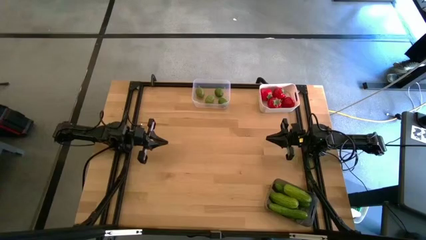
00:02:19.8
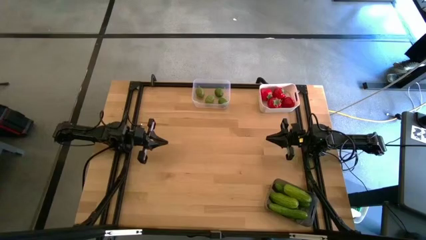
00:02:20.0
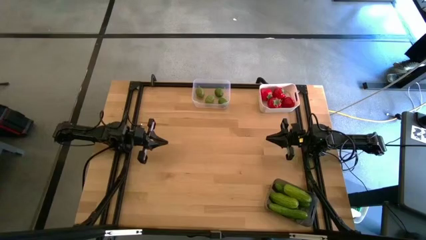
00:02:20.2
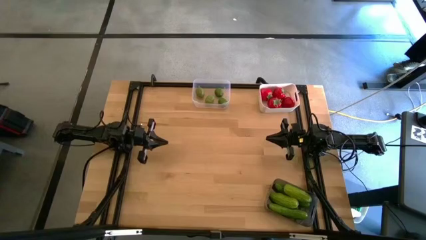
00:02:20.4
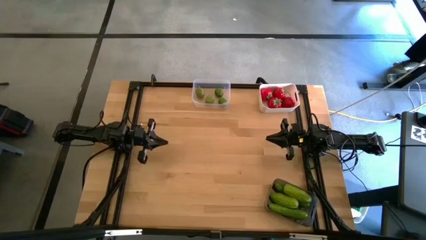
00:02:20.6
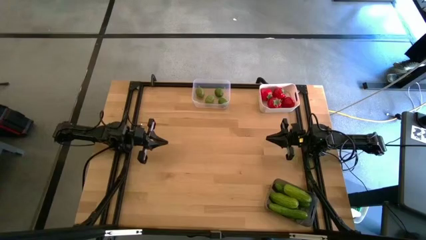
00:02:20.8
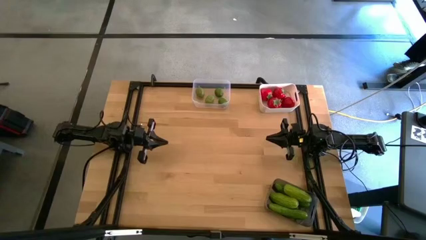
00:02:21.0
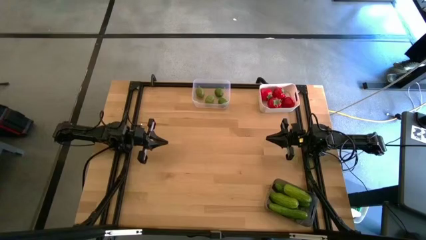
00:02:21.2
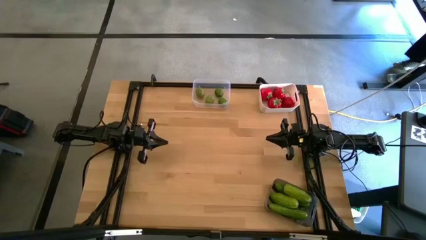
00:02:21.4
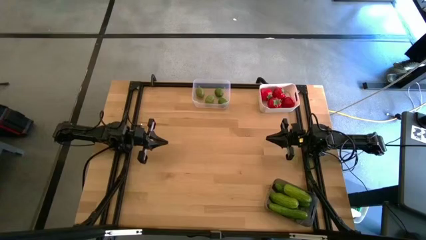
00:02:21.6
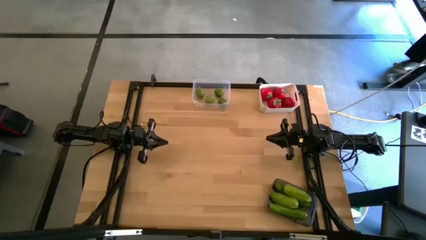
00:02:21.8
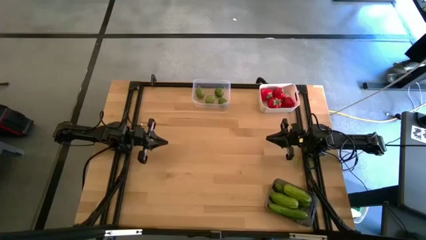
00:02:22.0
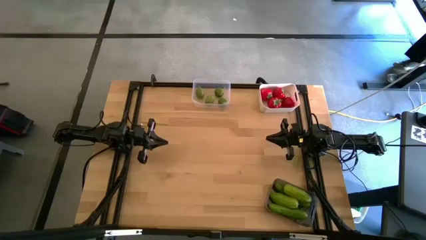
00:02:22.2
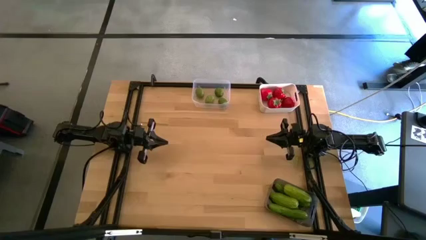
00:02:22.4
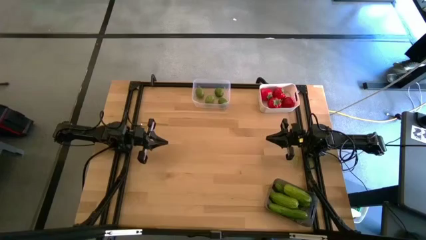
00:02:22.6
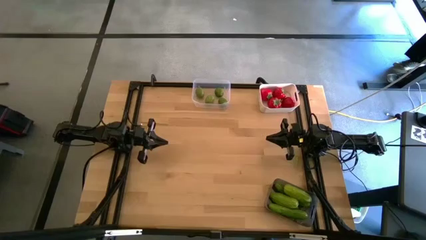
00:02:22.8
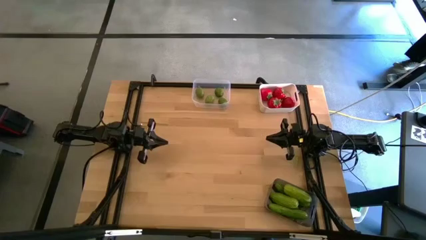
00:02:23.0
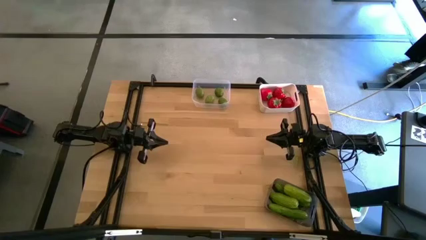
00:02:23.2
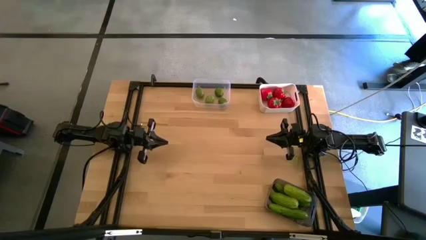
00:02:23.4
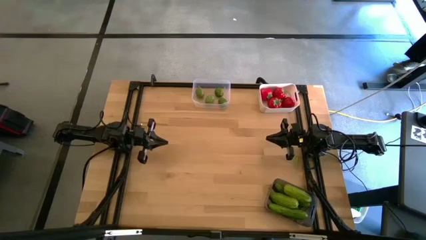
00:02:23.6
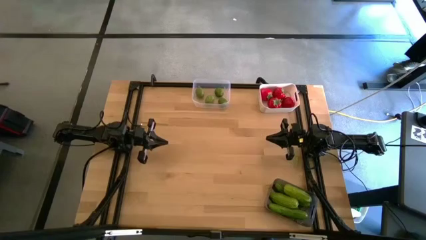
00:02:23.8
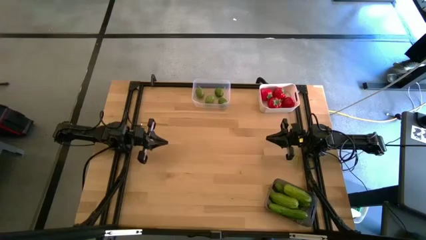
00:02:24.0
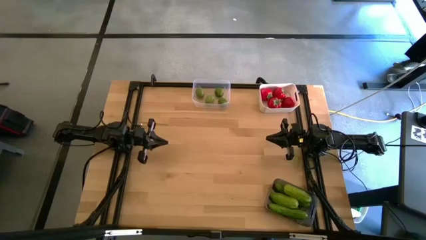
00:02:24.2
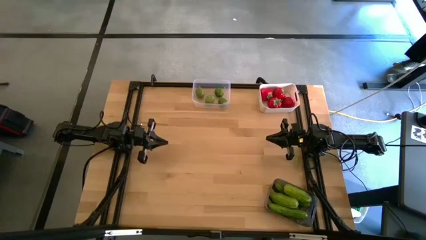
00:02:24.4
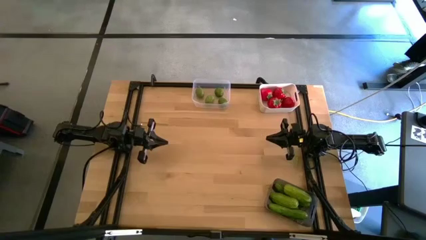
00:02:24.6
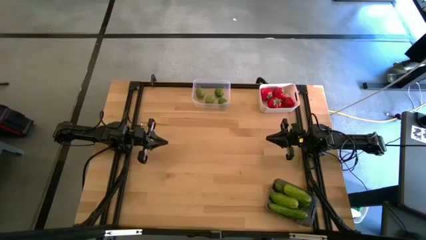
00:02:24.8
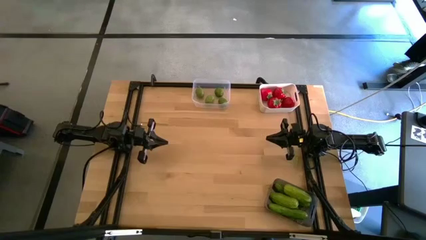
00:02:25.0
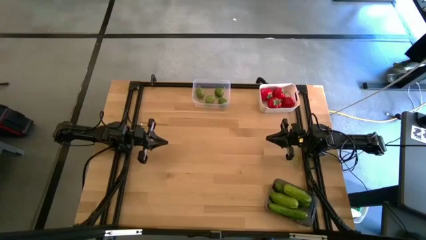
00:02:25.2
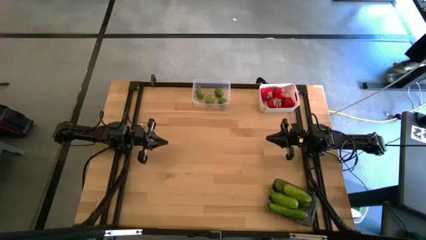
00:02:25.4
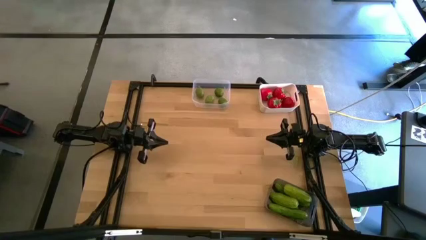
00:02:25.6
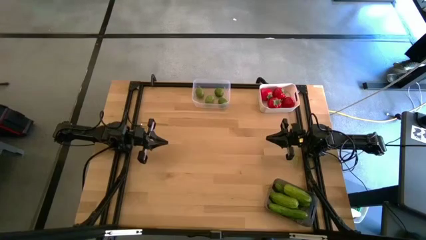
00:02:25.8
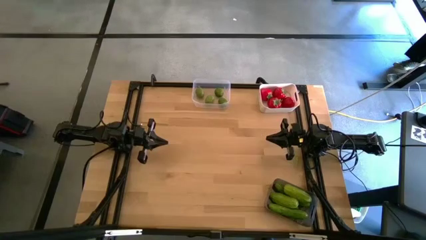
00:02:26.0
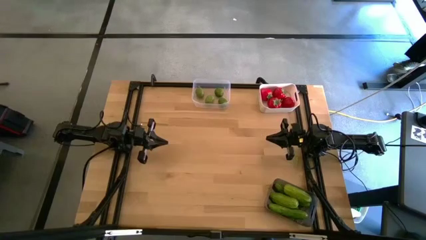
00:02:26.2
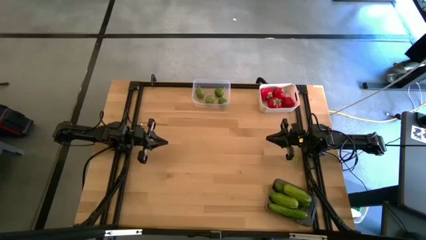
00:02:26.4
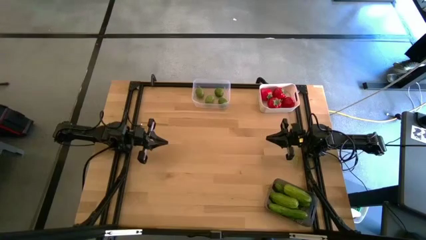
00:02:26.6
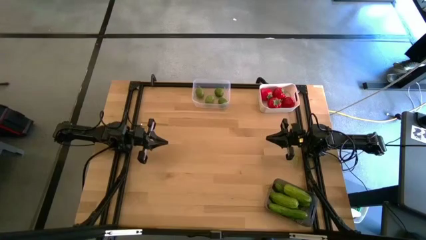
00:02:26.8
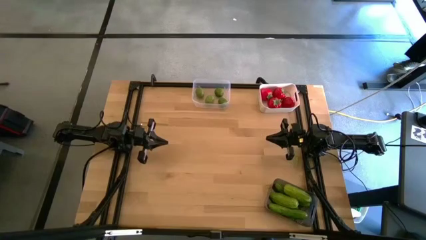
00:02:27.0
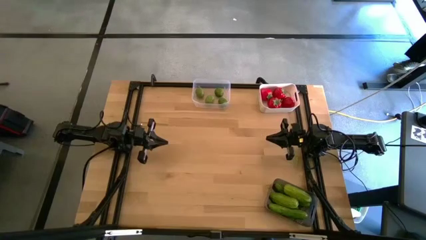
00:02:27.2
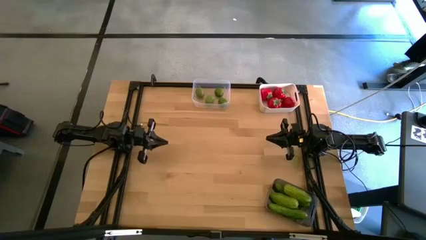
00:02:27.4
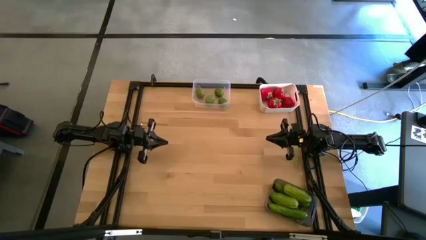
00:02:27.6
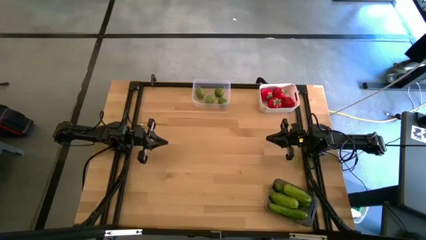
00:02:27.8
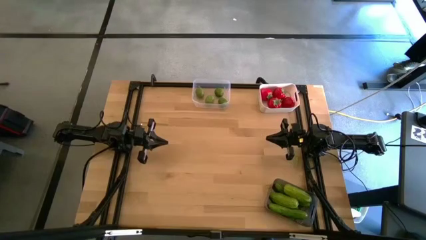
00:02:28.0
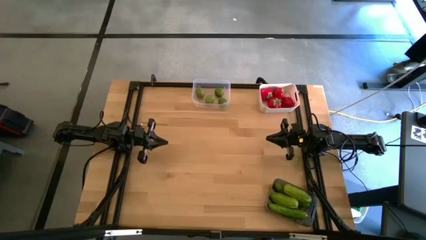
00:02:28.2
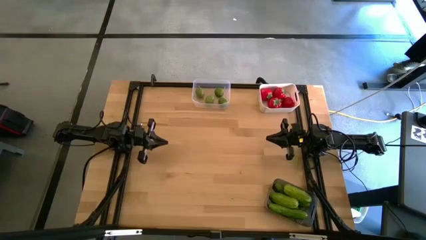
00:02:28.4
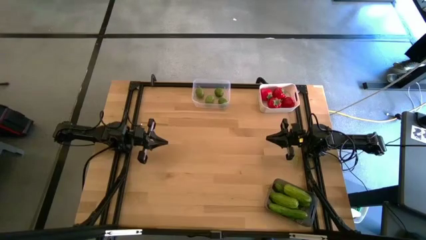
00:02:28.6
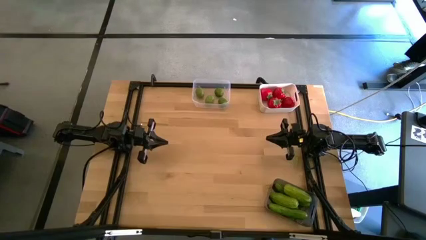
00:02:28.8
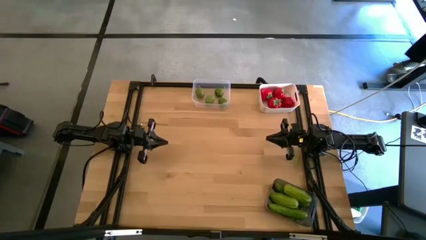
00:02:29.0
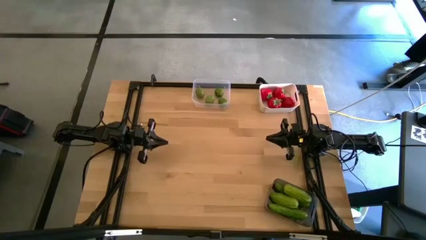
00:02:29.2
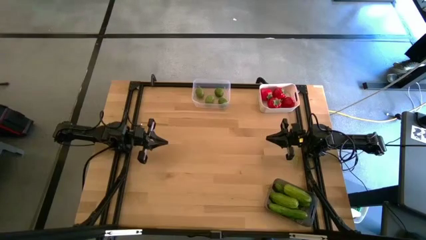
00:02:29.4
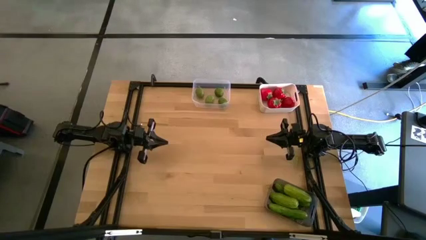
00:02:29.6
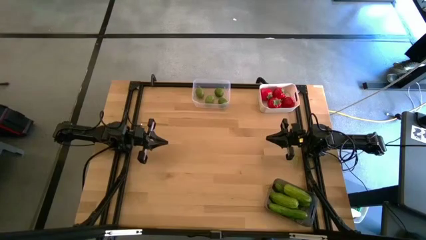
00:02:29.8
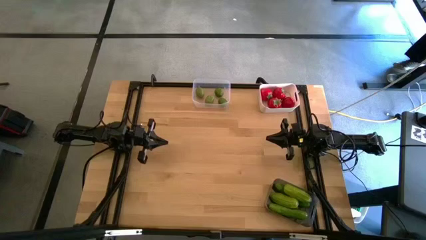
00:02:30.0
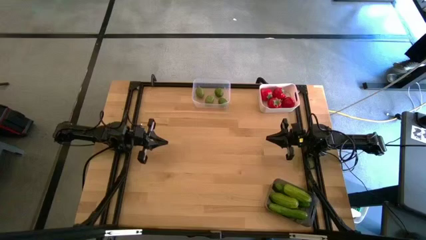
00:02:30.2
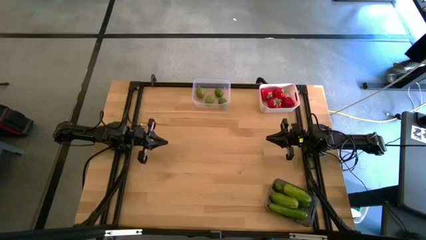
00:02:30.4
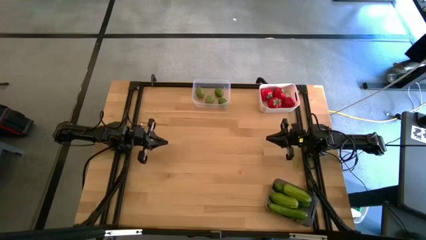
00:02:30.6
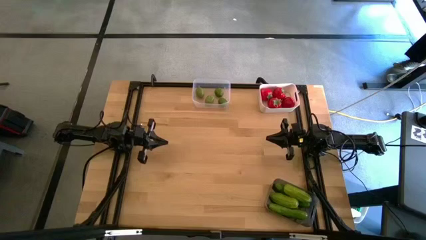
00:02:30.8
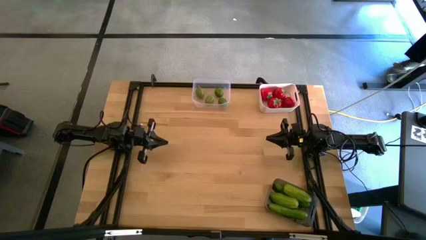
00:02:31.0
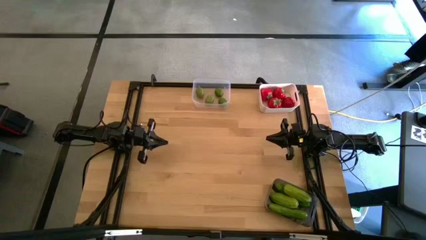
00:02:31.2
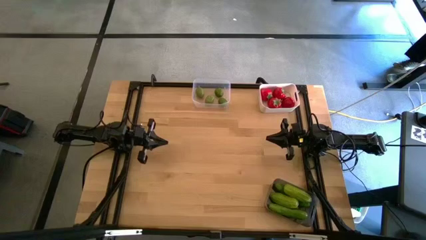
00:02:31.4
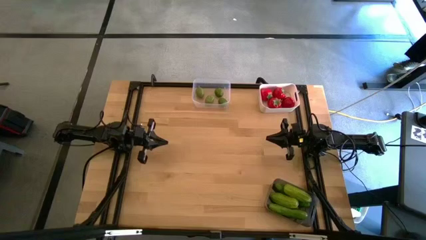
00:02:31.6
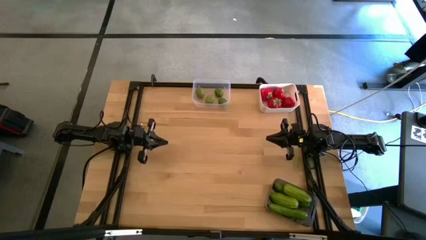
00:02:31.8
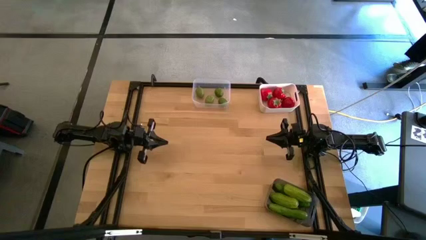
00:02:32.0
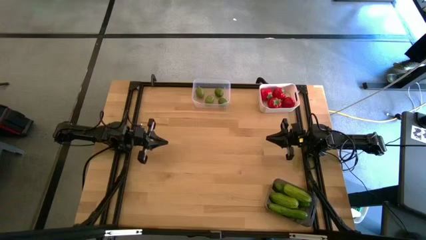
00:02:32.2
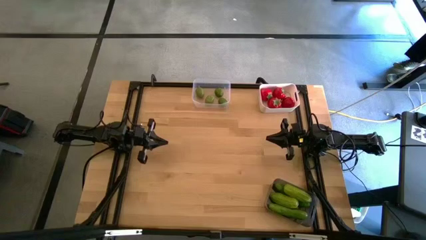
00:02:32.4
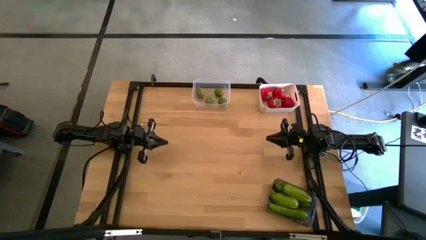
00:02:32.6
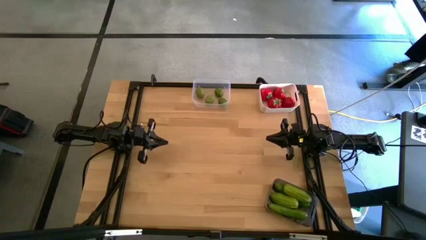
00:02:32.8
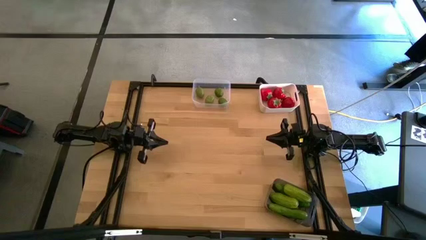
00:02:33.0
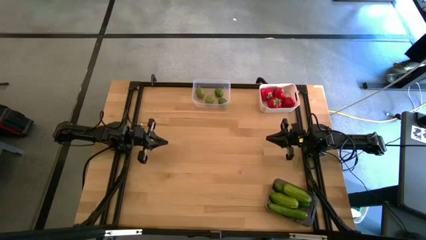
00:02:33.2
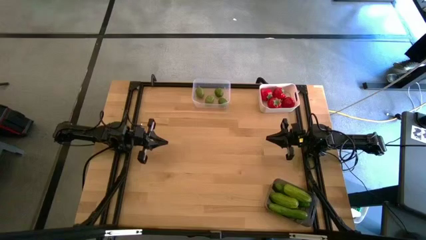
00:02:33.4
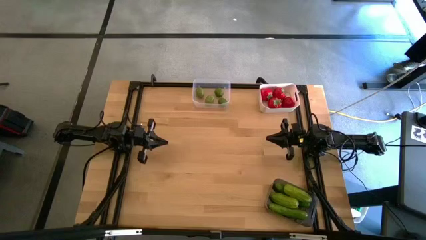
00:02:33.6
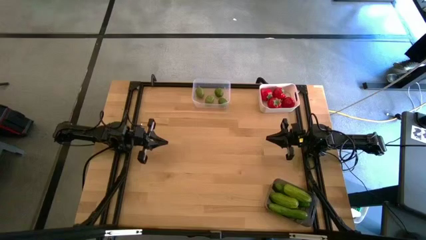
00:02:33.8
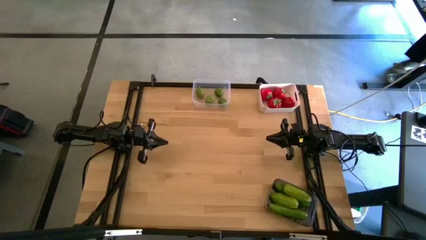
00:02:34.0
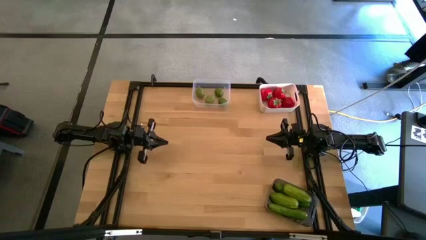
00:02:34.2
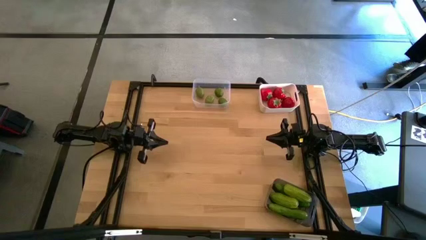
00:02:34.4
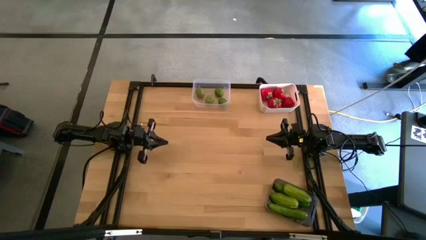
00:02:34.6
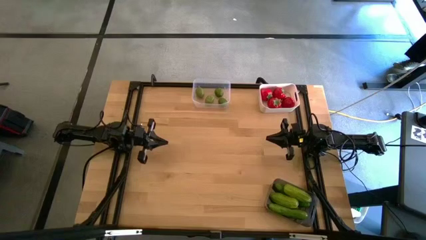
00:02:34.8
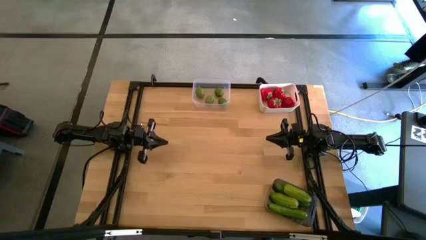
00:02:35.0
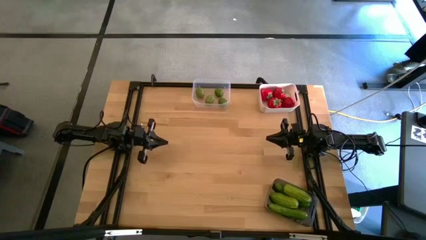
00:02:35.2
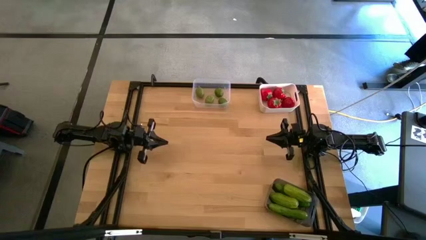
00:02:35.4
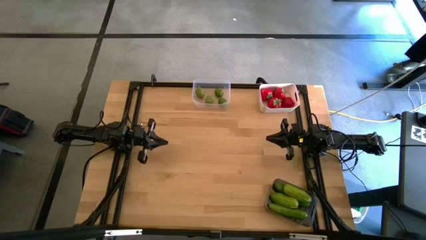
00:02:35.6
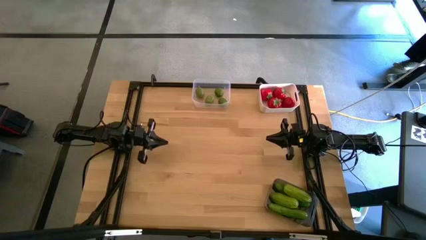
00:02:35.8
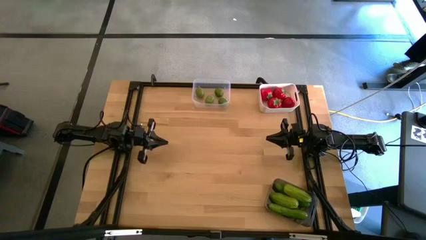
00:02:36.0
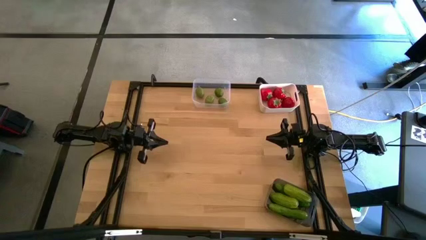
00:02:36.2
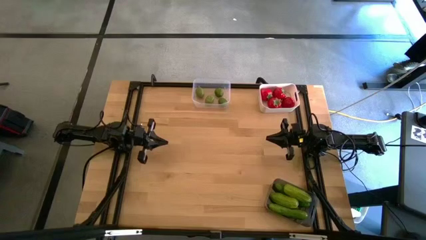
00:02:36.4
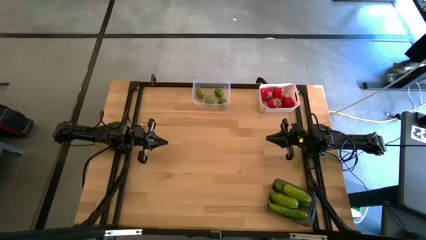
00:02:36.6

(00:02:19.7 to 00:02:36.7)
Task: Sort produce into baskets
Return to Home Position
